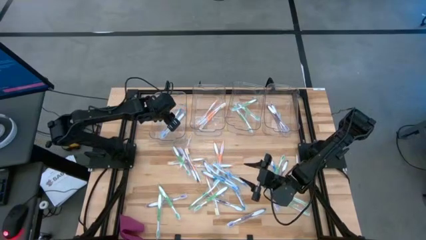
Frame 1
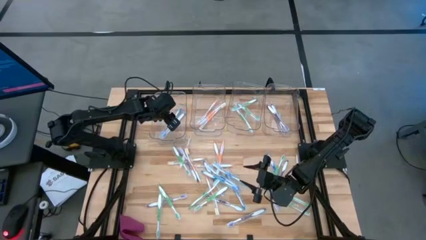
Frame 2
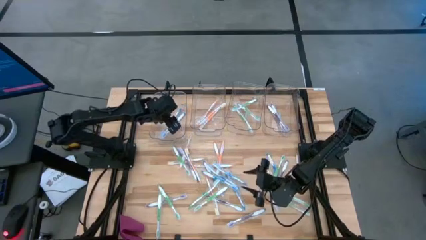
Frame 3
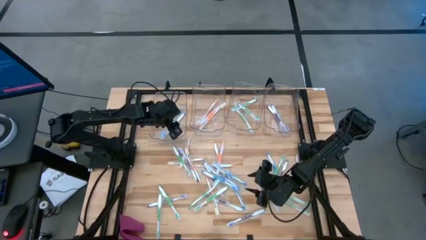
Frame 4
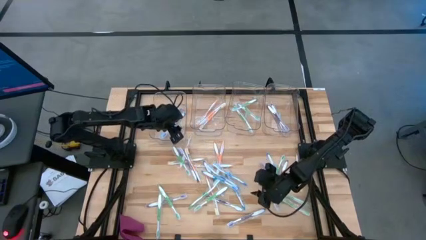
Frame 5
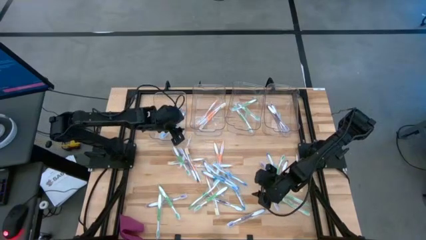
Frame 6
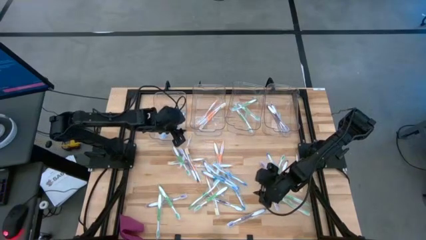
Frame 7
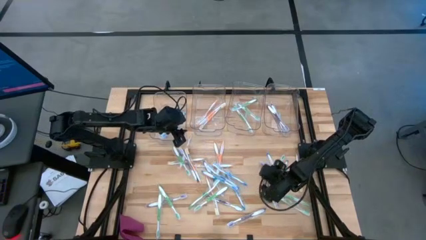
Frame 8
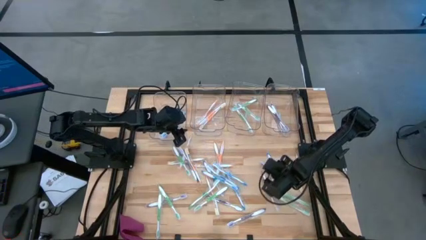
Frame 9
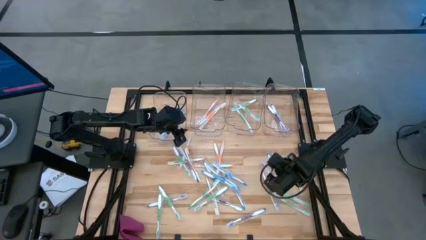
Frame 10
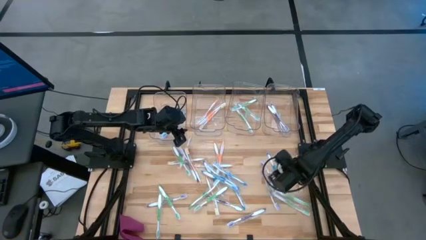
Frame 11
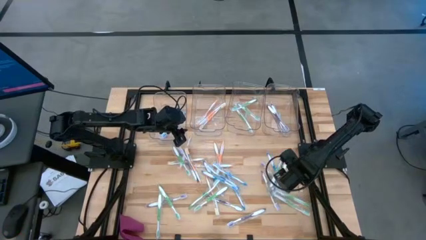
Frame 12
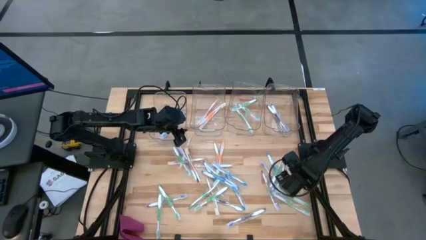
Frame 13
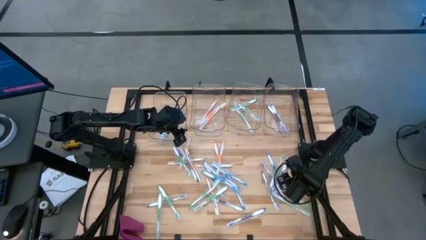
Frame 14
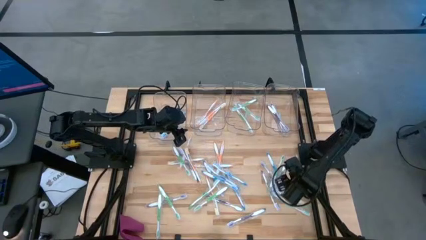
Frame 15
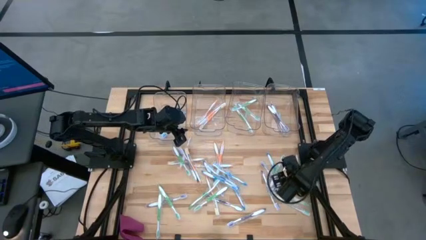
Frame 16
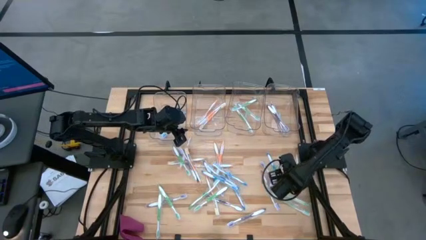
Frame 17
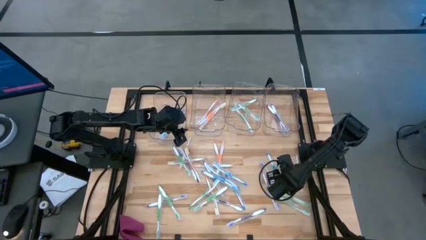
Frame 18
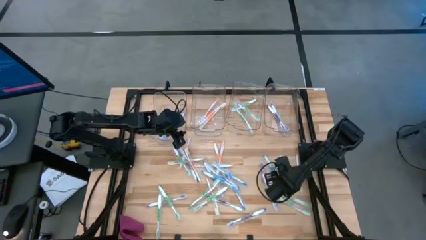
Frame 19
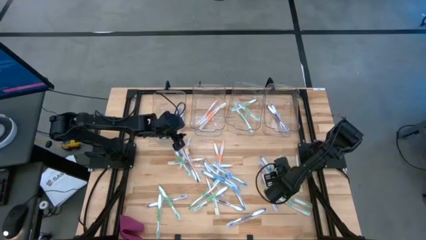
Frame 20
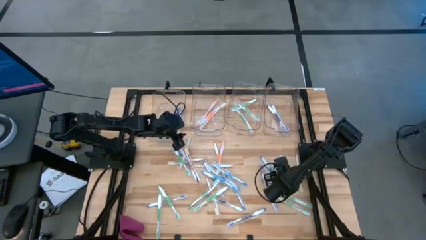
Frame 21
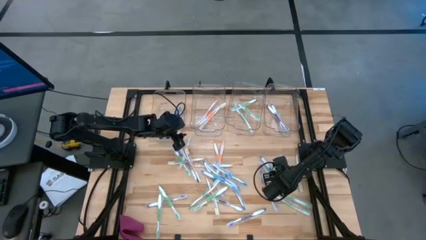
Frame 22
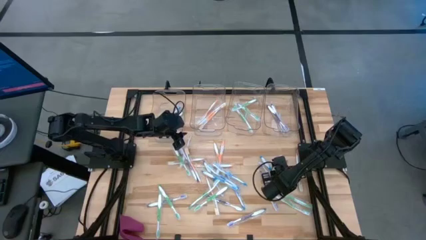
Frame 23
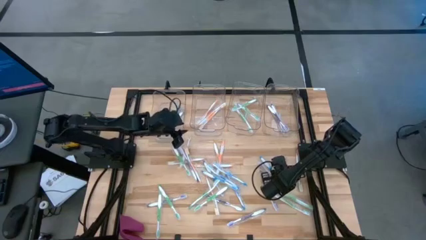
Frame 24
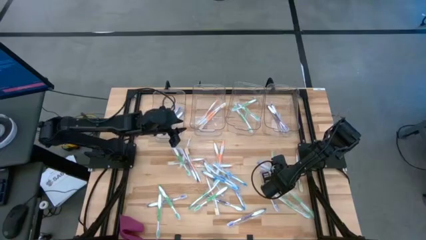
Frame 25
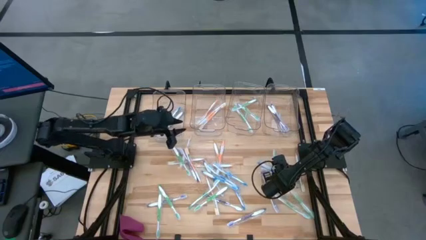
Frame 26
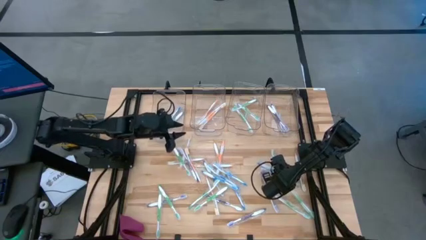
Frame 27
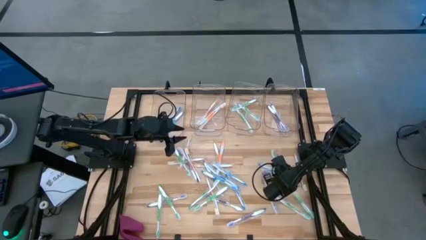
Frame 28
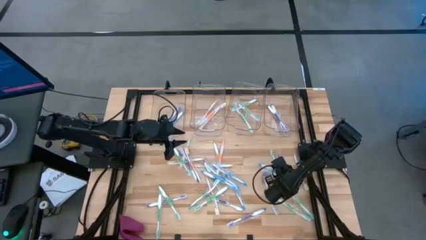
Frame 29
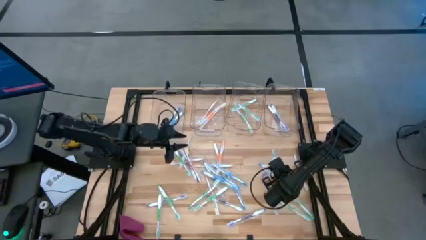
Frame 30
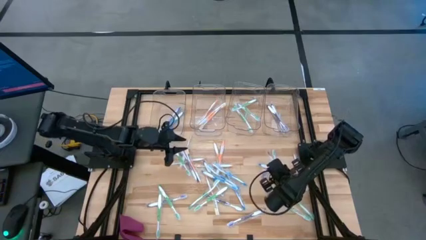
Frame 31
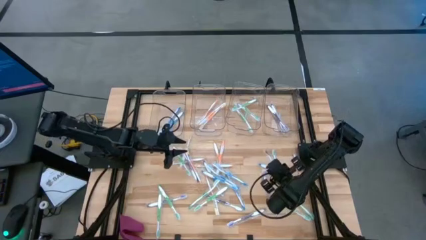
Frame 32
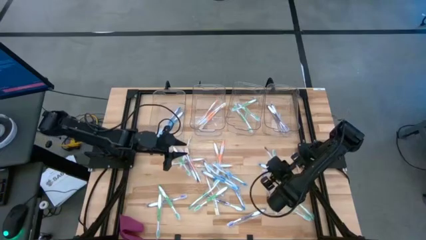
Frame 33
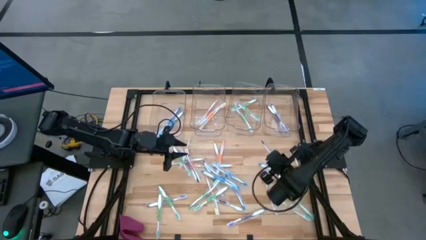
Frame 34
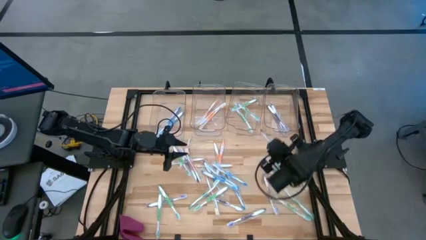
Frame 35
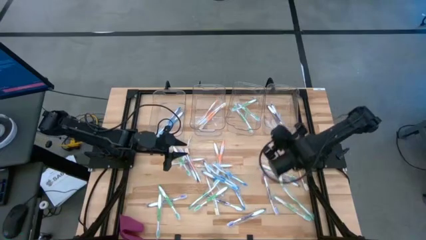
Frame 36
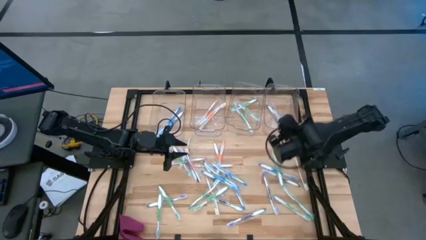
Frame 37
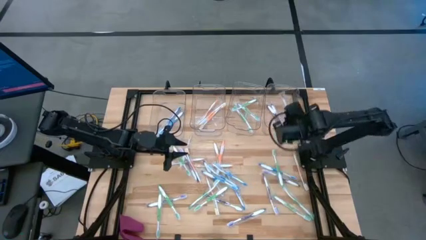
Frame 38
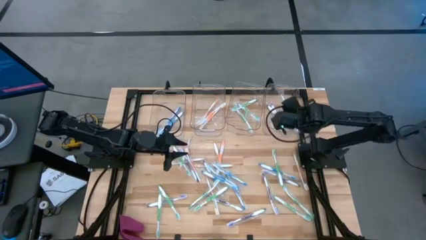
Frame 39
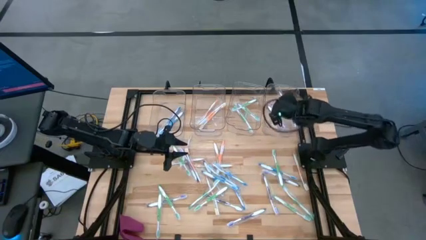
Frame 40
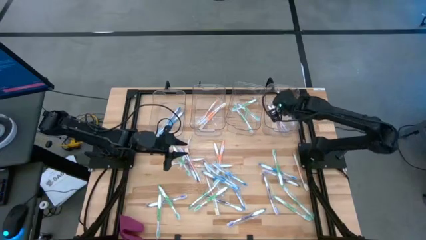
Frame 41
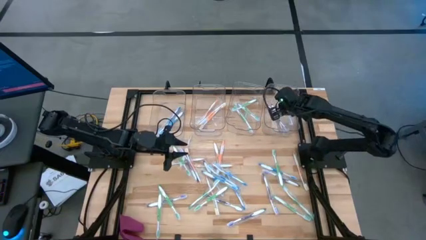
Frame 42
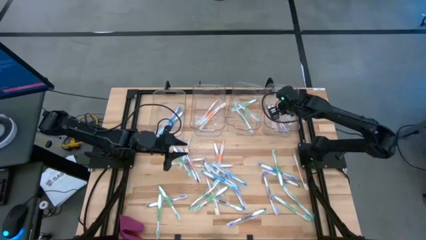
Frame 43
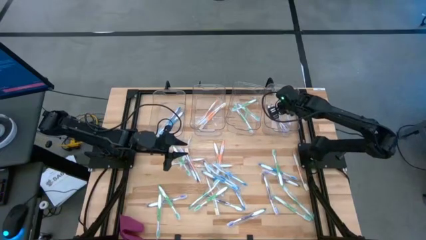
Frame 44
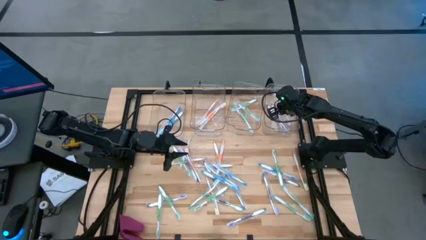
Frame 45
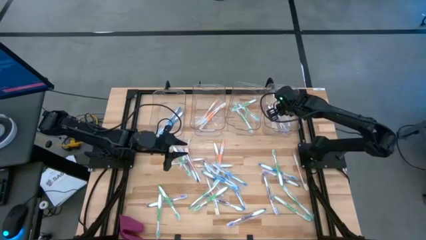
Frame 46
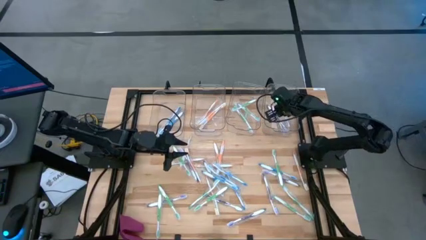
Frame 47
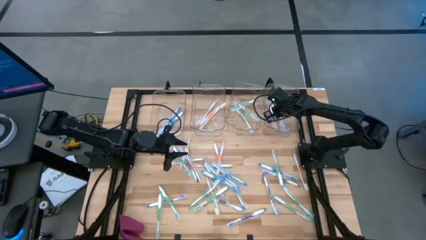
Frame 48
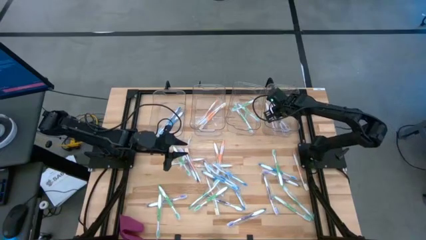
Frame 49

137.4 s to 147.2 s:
Task: Pick & Place Toothbrushes
Put the violet toothbrush into the right transparent bin

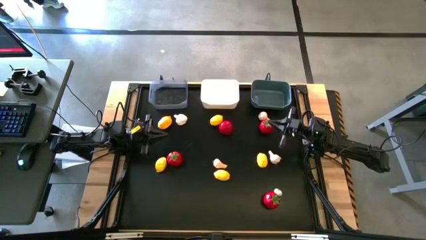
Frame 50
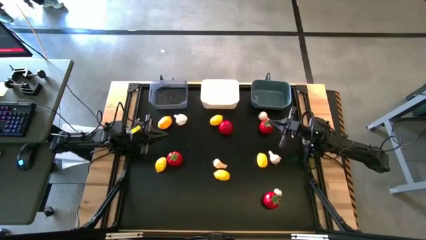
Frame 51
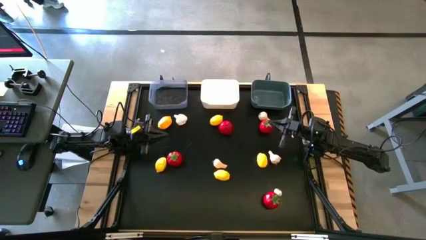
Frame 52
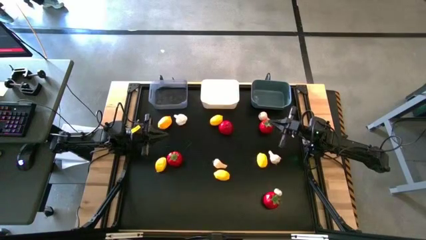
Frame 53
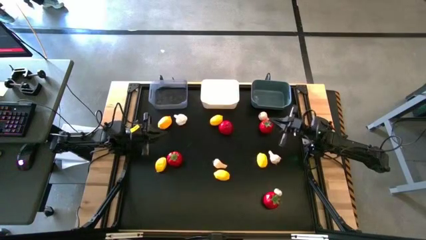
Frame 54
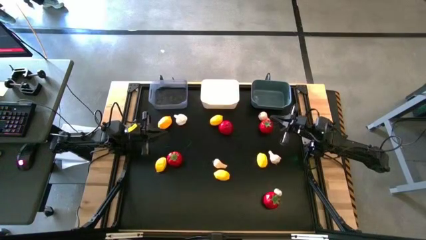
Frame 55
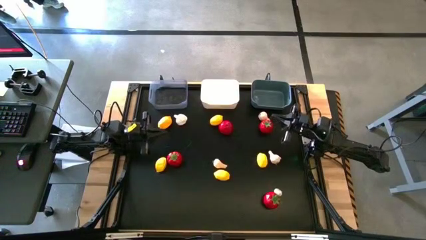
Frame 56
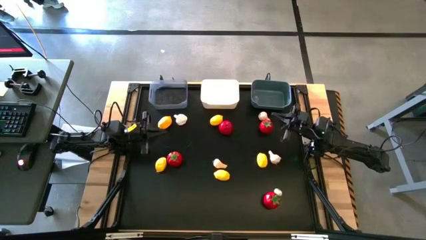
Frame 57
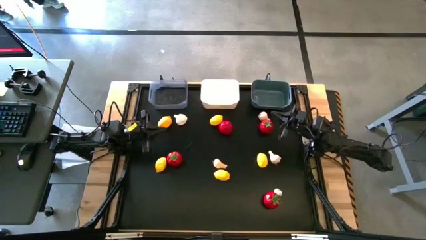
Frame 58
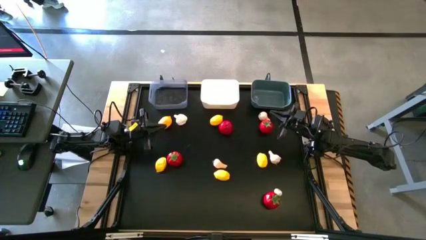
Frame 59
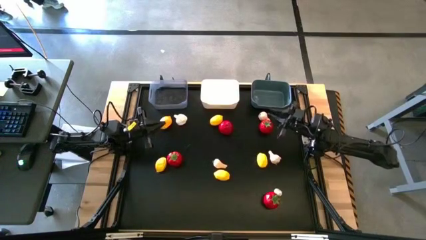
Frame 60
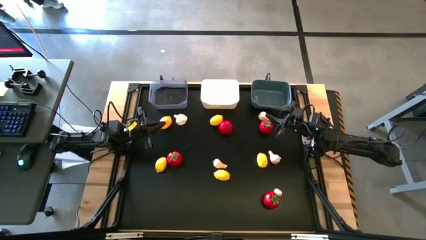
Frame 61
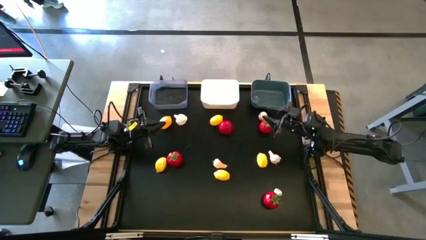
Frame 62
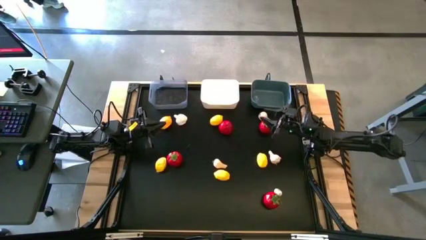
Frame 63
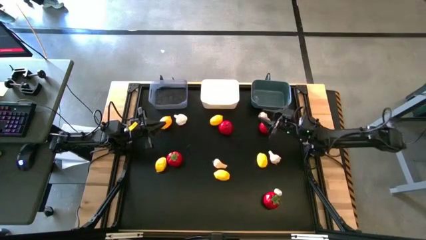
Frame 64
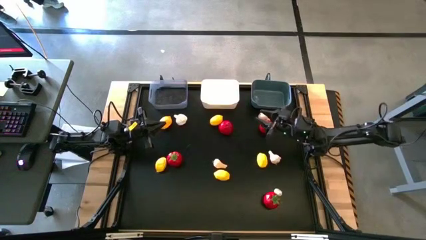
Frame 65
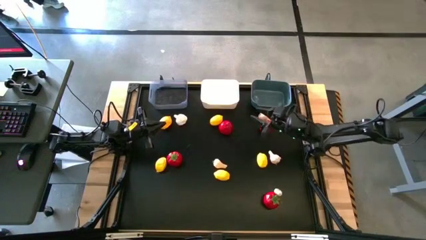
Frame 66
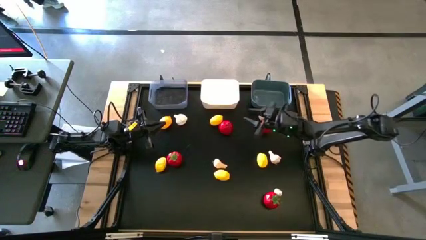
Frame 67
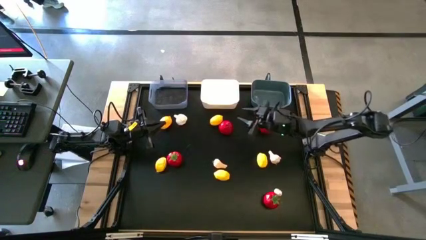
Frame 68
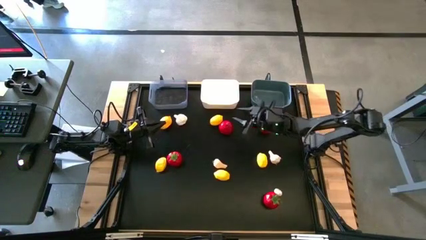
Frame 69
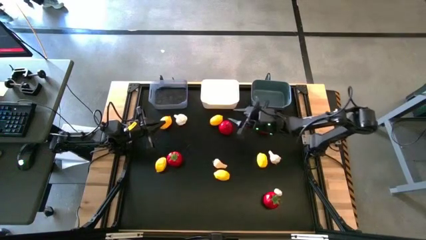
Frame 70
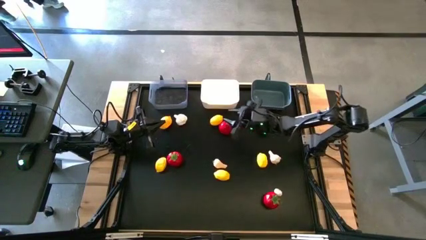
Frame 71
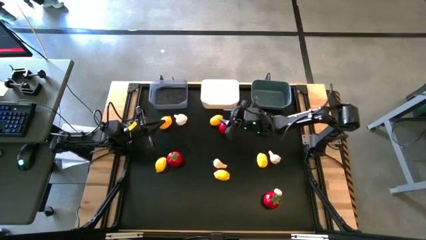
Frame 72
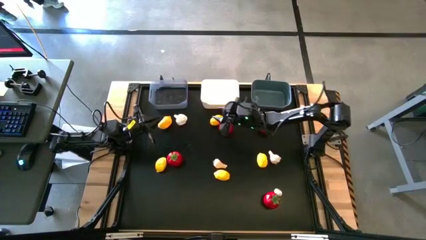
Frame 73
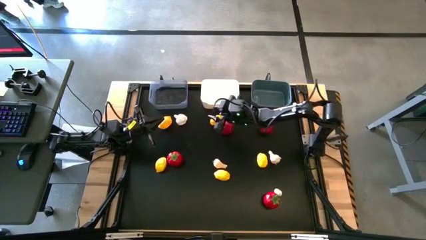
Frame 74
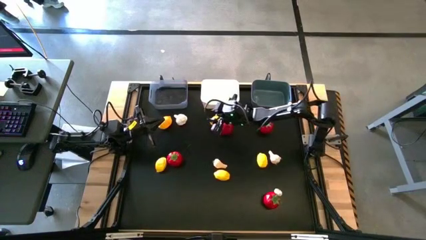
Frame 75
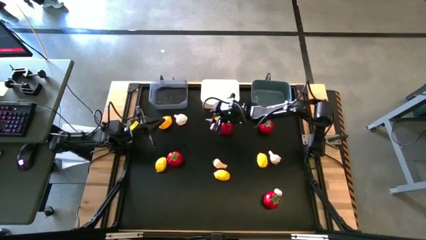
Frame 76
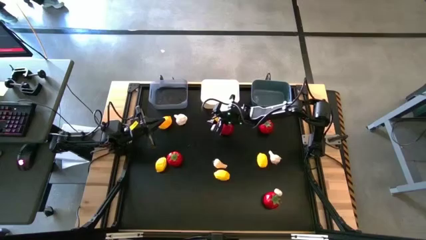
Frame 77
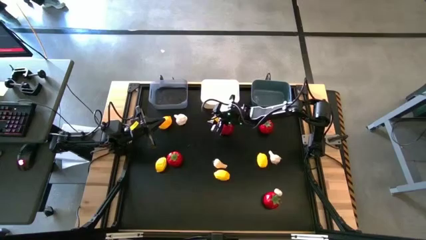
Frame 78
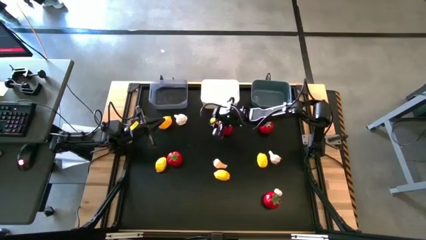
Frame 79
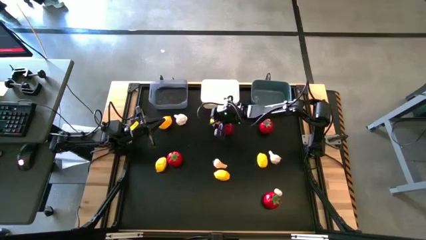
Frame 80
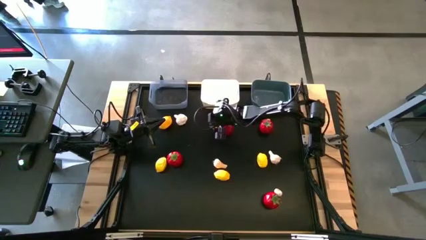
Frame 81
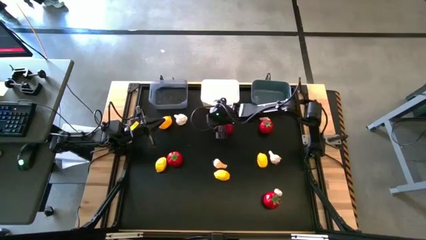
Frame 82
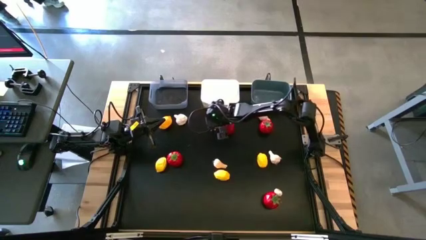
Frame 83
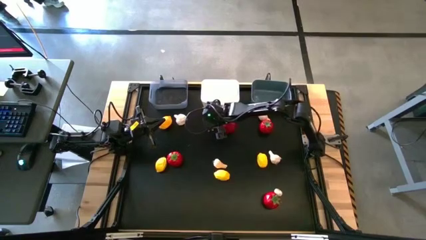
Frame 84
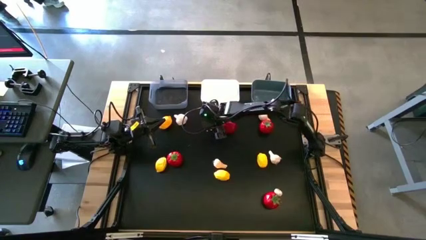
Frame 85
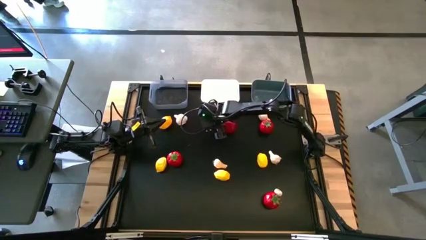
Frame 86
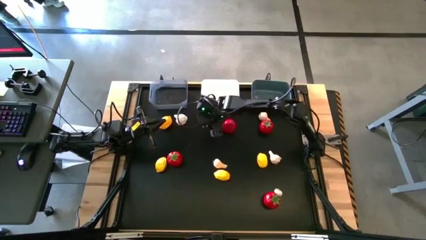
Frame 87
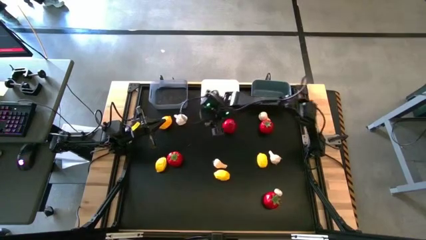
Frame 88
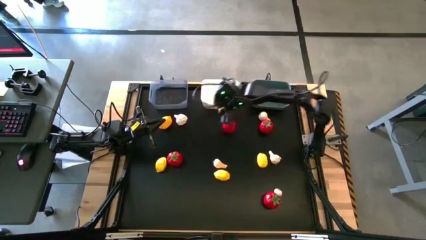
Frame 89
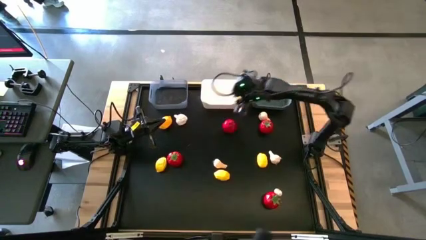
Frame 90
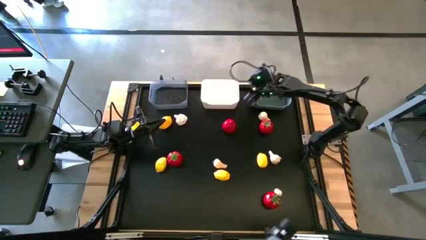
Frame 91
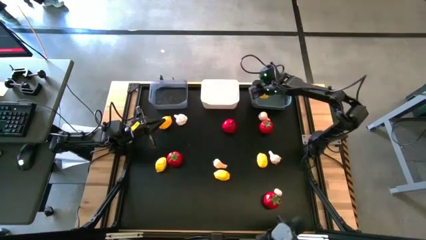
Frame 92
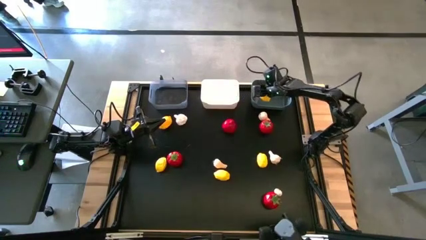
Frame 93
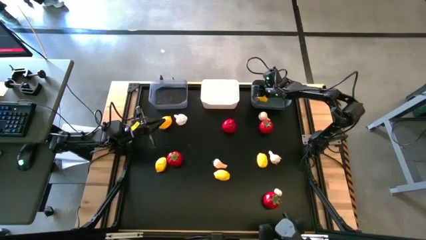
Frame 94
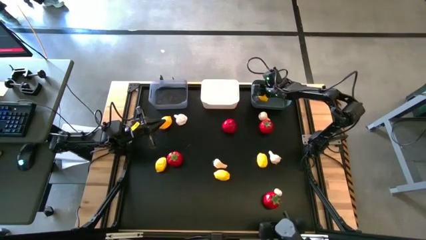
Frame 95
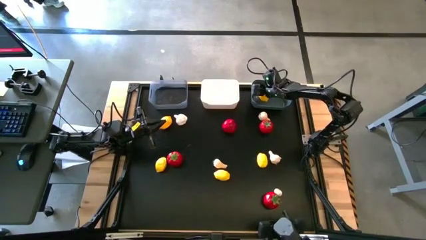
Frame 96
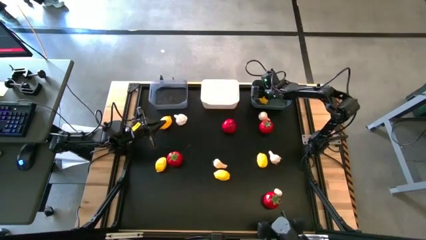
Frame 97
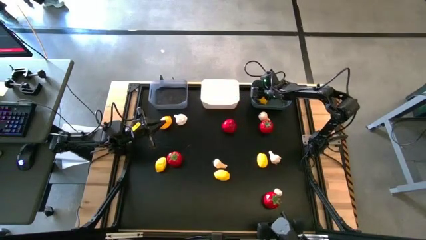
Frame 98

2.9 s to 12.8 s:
Task: Sort produce into baskets
Put the lemon into the blue bin
